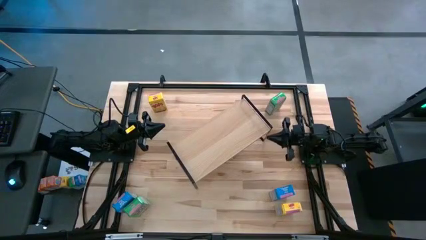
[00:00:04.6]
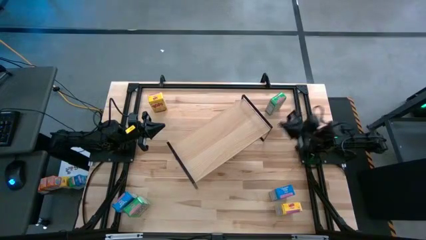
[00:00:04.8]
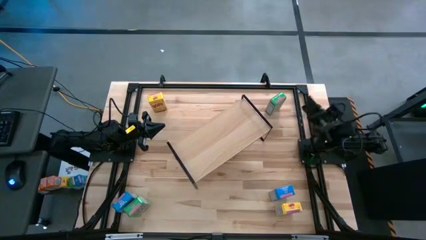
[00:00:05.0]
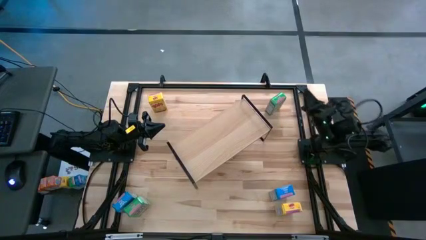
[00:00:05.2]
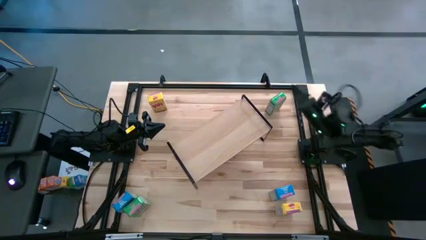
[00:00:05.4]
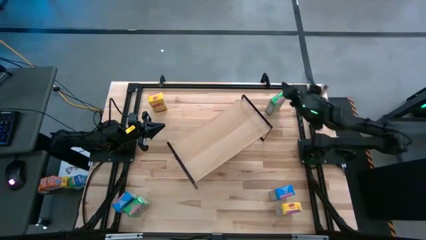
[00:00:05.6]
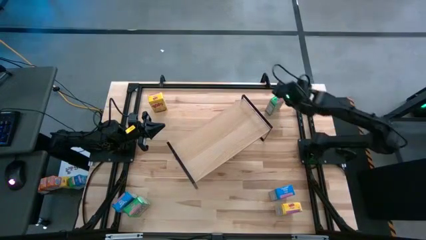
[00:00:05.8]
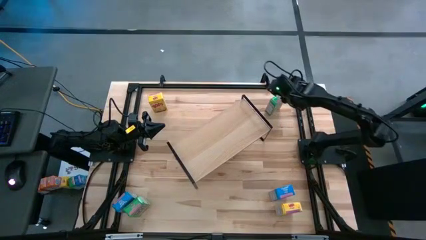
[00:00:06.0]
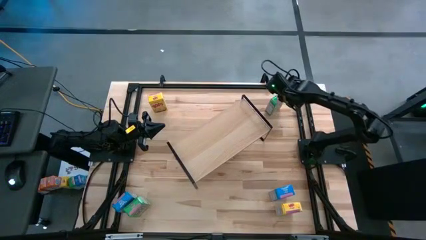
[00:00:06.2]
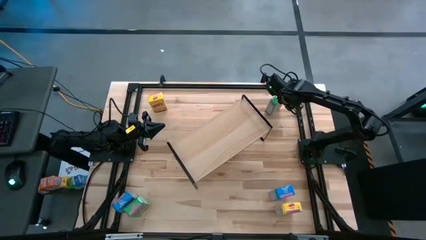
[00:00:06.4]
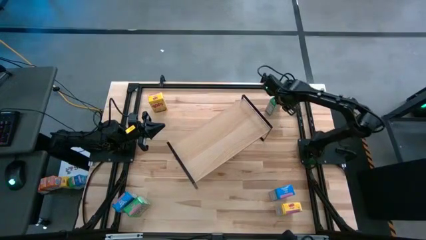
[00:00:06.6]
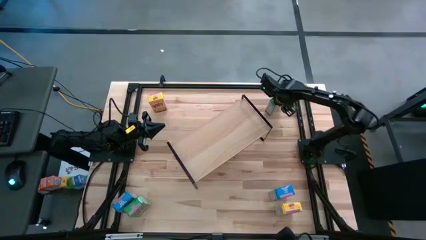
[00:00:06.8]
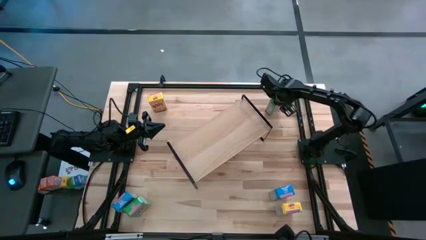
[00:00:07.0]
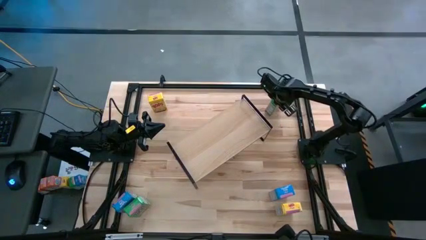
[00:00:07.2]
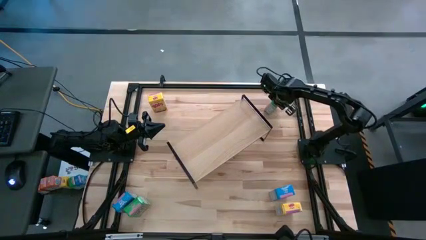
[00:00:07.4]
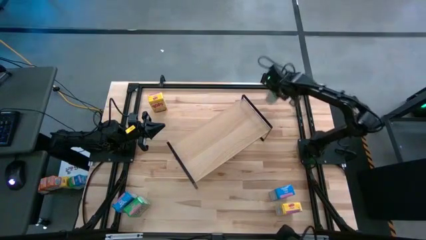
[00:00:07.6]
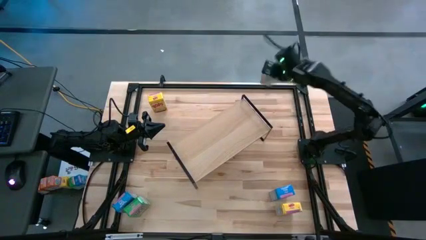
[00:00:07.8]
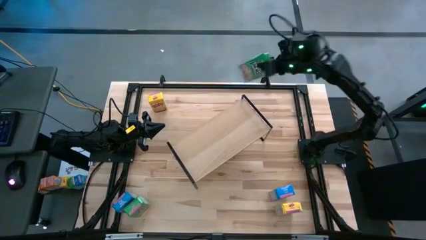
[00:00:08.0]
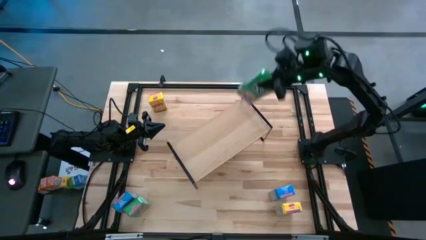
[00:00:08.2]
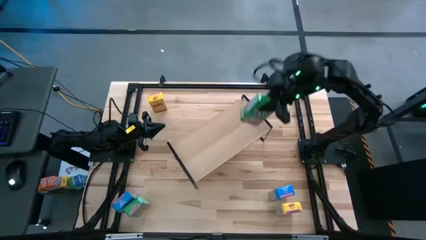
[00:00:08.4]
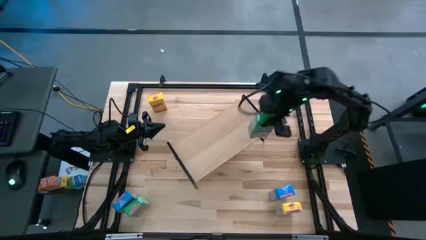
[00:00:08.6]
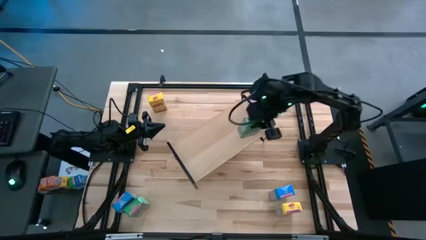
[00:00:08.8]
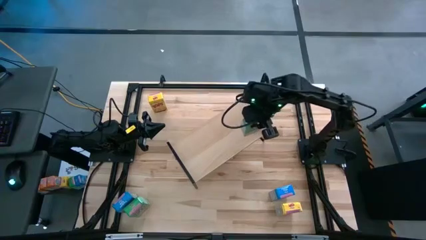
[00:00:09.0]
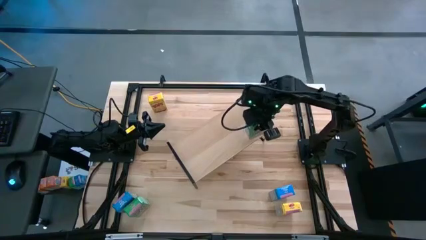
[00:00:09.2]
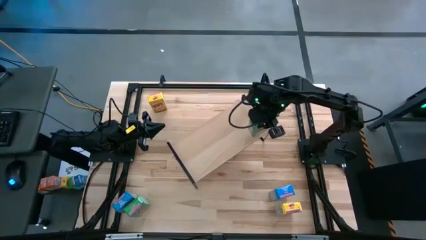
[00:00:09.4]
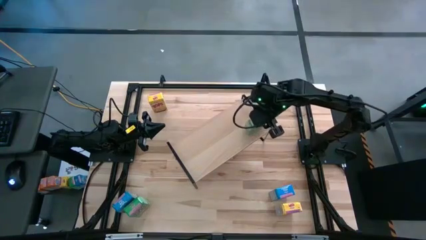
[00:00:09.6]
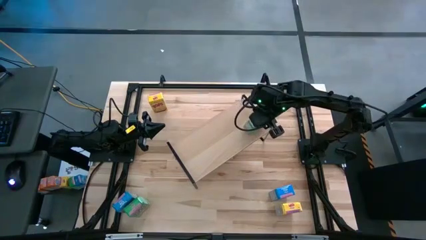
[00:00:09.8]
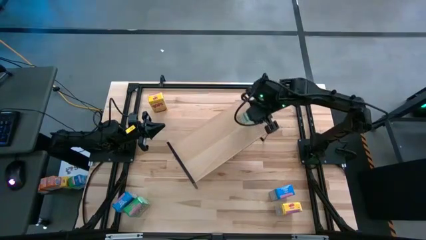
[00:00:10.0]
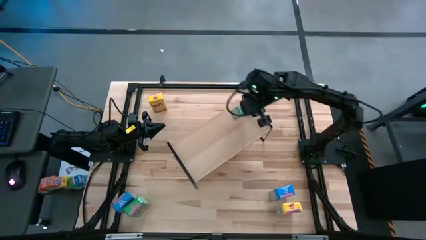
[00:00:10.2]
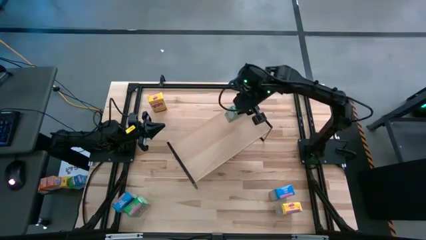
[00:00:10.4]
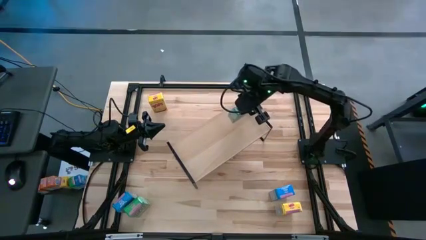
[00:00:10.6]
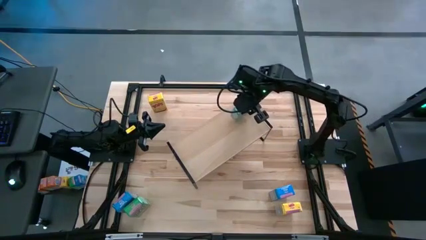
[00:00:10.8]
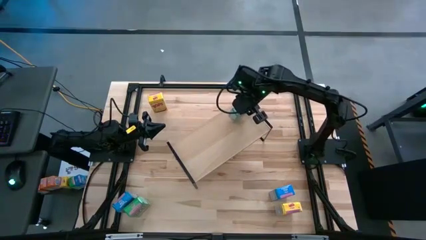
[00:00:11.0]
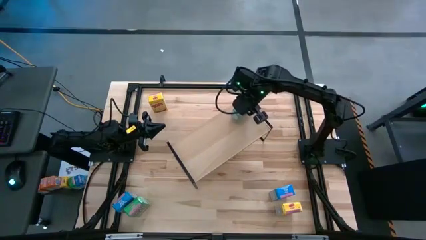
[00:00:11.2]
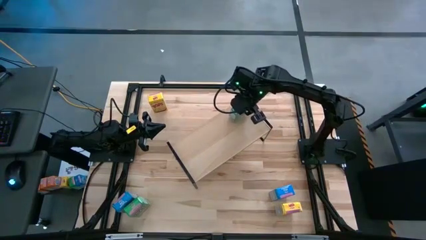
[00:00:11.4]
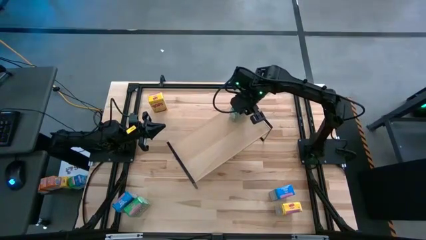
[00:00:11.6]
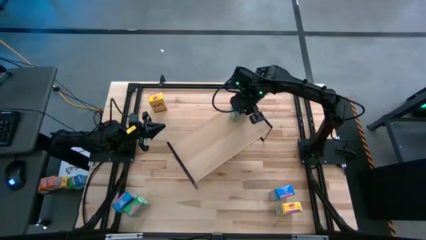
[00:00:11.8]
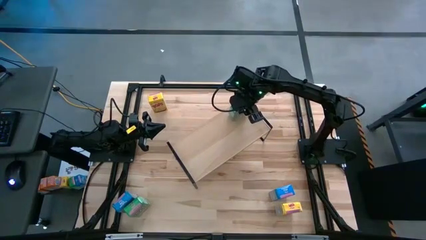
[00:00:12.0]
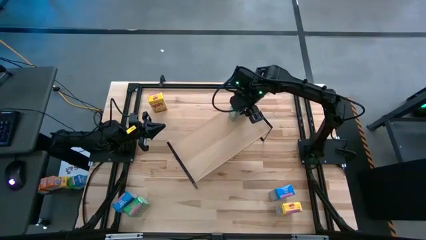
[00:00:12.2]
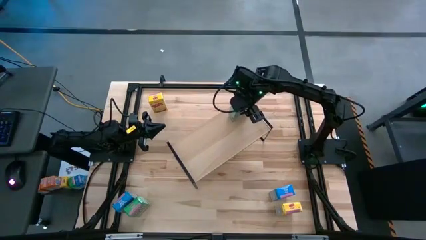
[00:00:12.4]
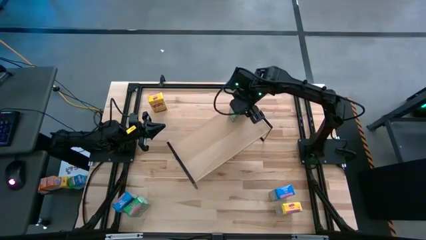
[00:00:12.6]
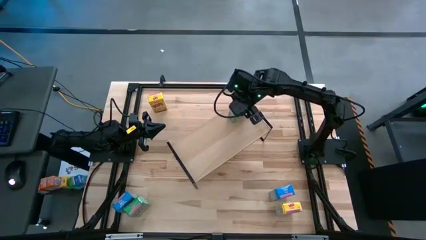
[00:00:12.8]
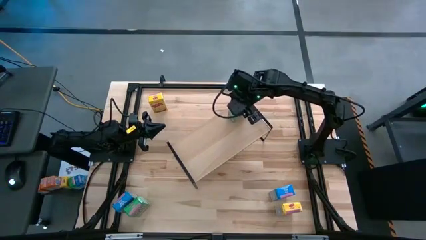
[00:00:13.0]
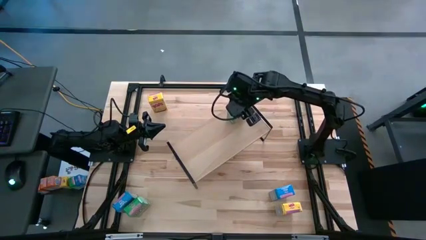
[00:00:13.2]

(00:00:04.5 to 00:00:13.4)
Task: Stack cereal on shelf
Put the top green cereal box on the shelf

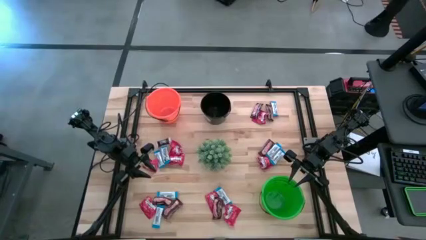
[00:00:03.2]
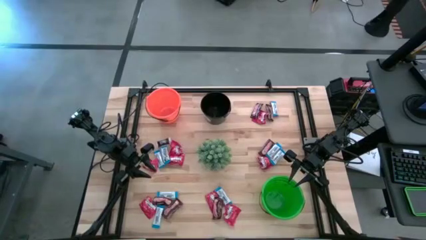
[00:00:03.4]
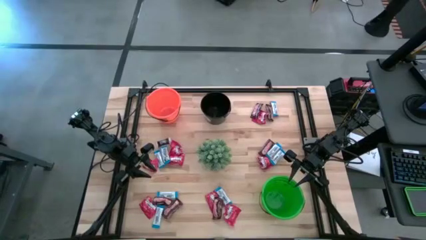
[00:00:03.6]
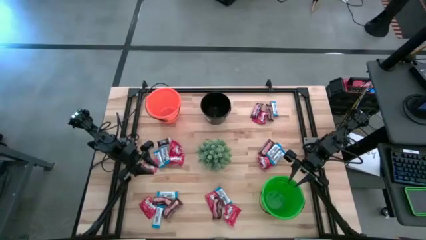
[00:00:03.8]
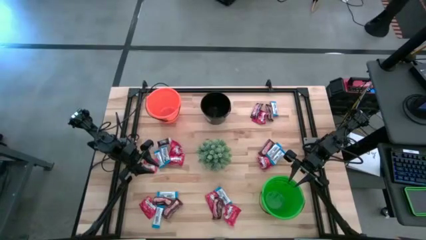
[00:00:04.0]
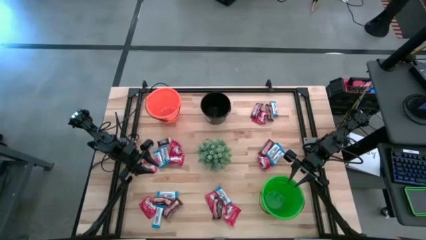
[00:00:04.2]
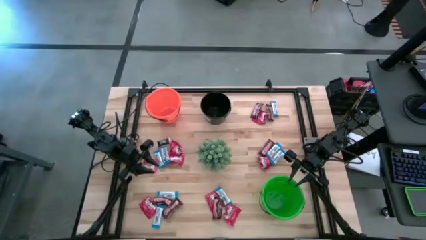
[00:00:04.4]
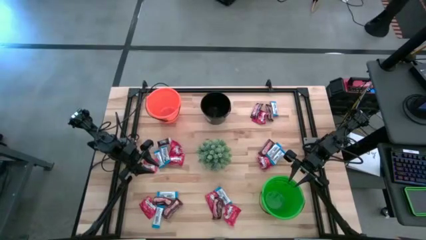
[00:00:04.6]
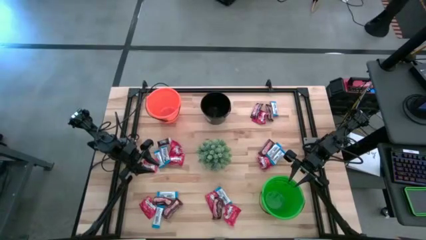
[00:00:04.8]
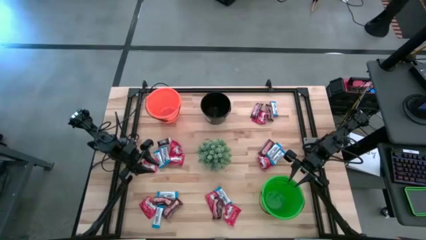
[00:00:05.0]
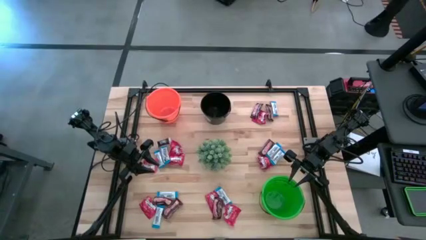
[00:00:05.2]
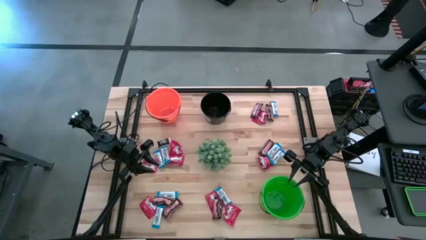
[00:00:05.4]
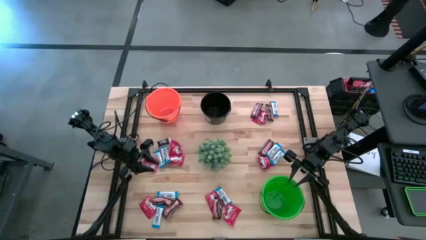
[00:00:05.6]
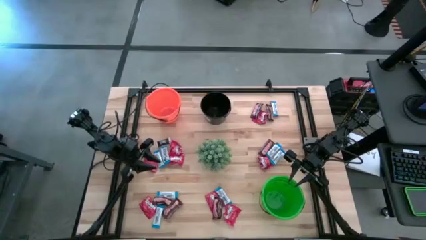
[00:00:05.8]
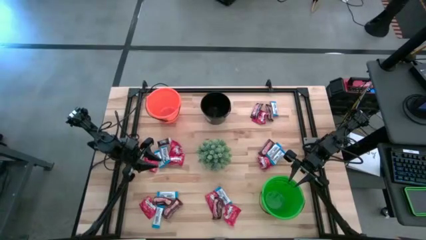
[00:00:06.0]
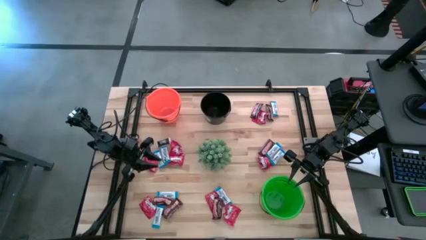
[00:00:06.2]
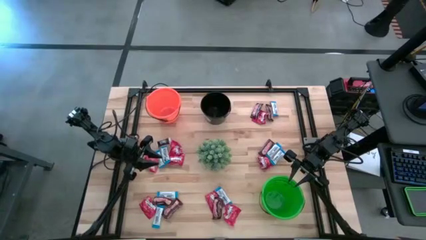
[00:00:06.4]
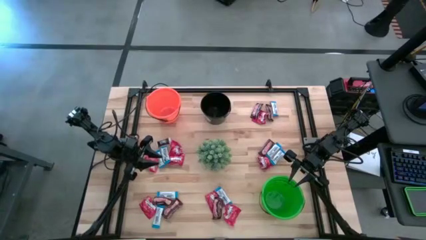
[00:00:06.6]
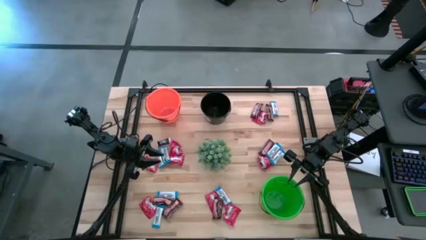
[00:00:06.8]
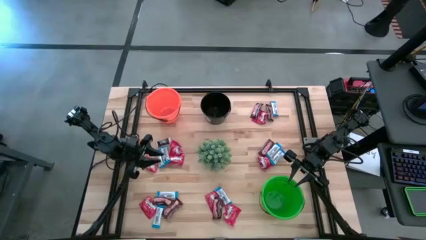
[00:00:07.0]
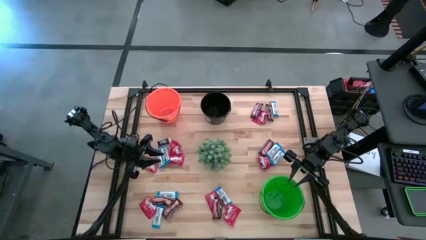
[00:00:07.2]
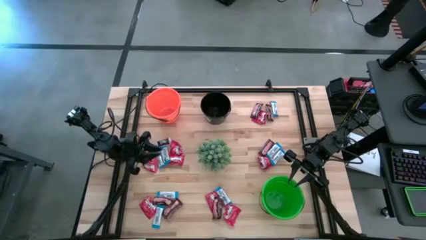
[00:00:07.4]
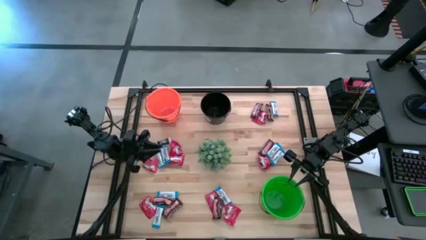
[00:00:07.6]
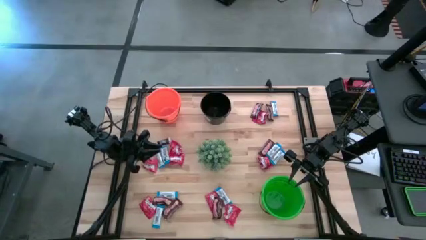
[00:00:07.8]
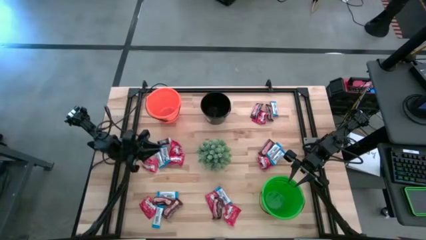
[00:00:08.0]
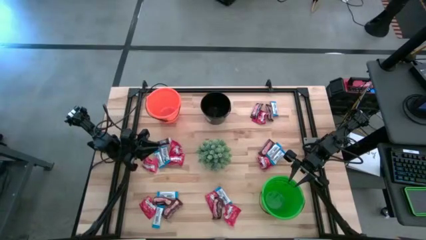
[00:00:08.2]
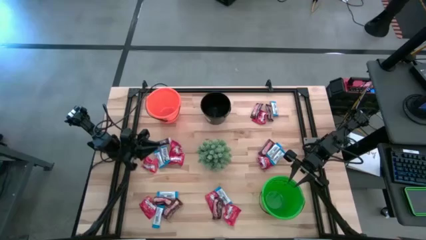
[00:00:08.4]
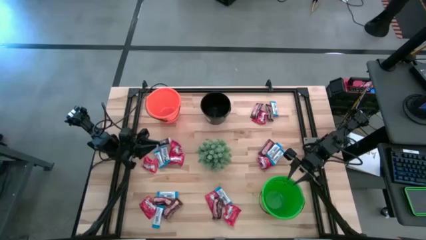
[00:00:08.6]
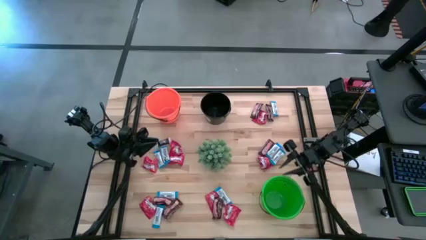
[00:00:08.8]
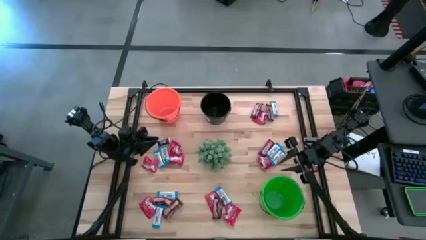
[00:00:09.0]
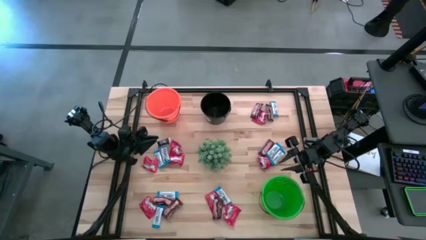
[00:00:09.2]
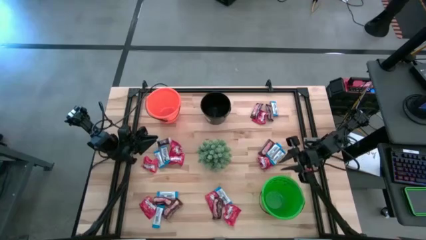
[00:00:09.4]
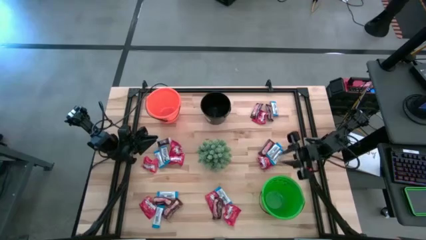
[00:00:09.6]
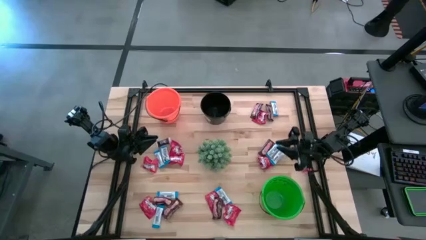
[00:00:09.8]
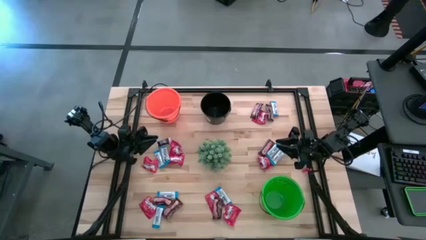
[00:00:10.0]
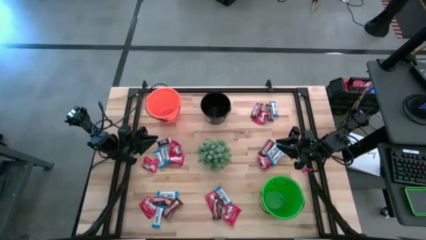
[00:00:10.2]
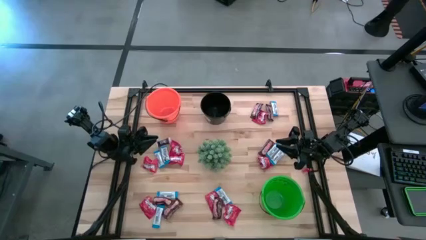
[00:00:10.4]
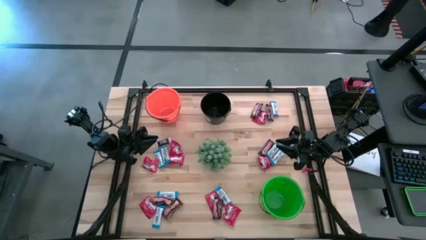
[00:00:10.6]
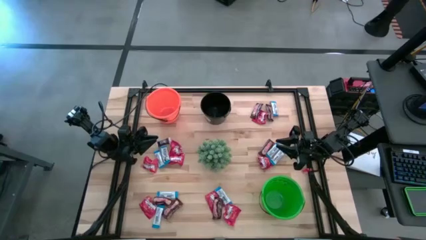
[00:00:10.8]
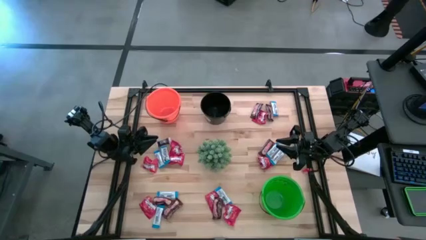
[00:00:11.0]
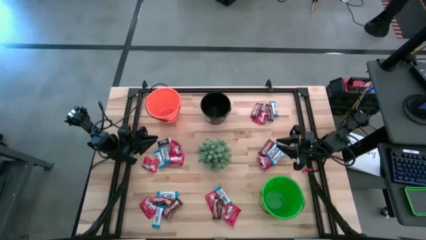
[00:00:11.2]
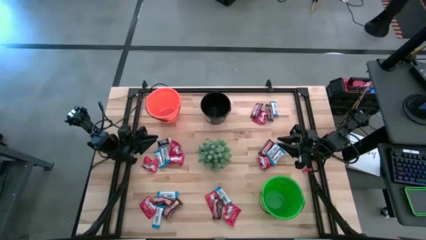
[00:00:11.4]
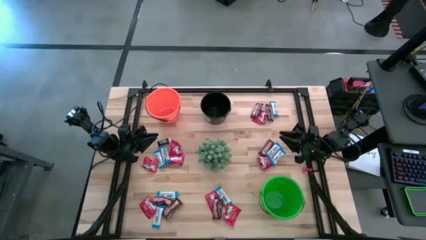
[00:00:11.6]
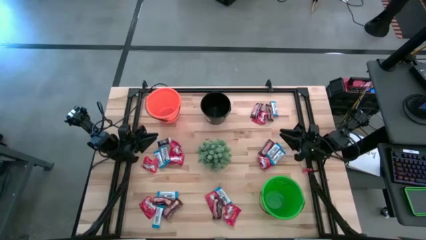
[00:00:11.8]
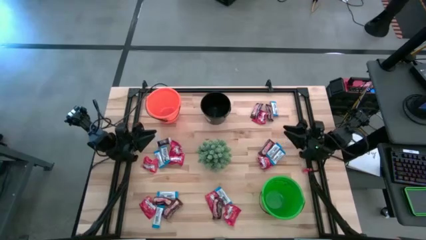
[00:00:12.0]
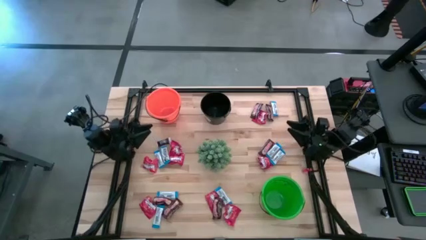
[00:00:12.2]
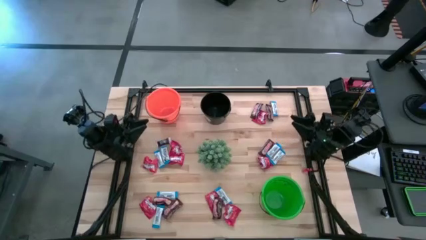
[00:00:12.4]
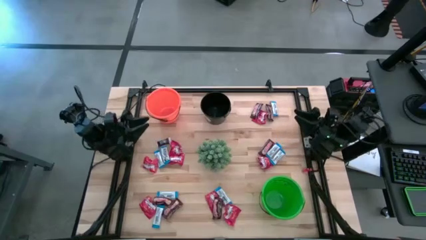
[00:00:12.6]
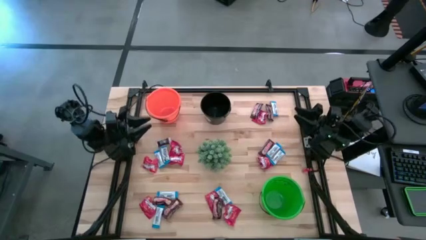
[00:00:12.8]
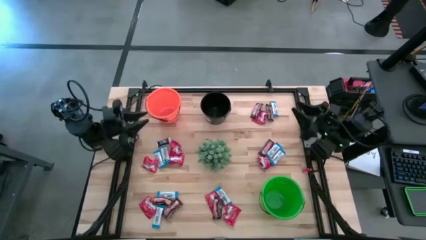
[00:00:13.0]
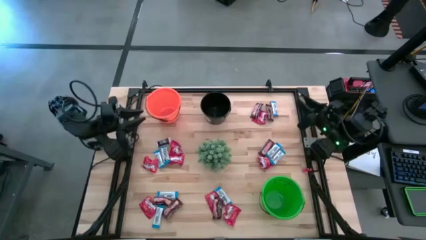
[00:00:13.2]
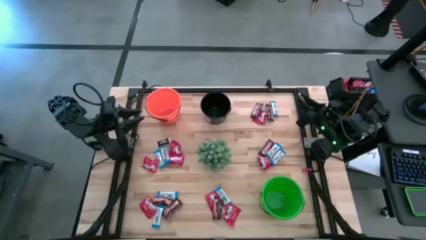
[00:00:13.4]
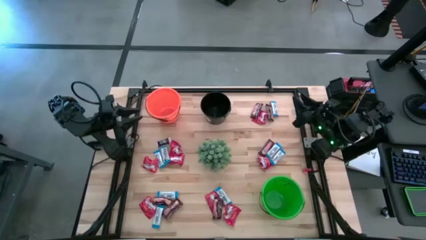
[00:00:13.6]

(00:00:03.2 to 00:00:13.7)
Task: Sort candy
Put the blue chocolate into the green bucket
